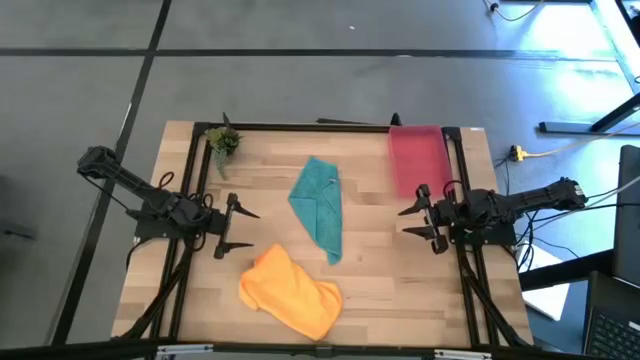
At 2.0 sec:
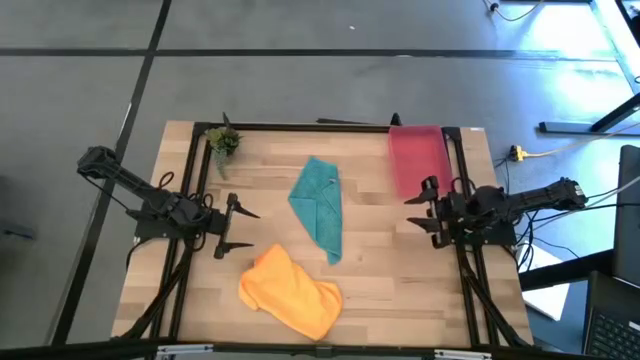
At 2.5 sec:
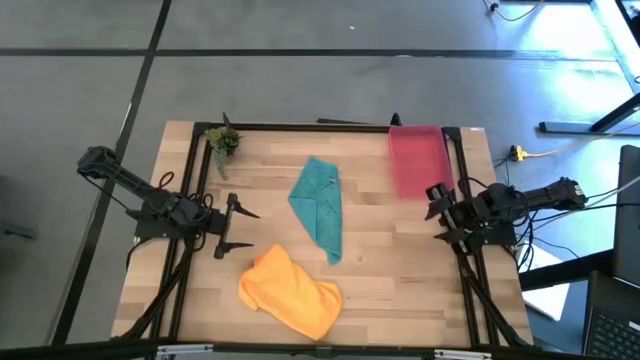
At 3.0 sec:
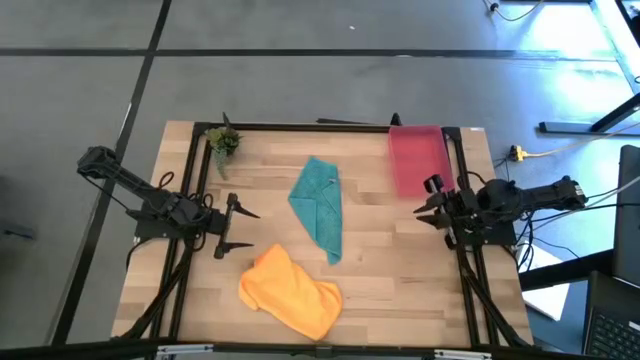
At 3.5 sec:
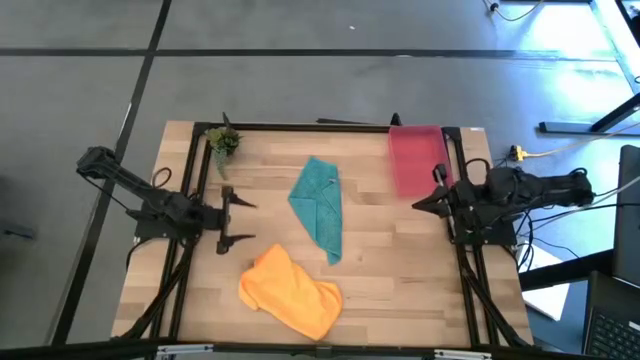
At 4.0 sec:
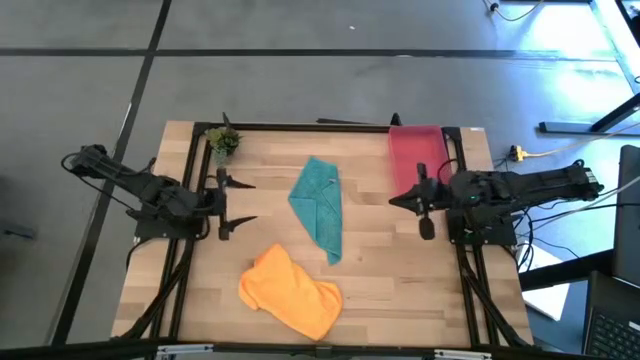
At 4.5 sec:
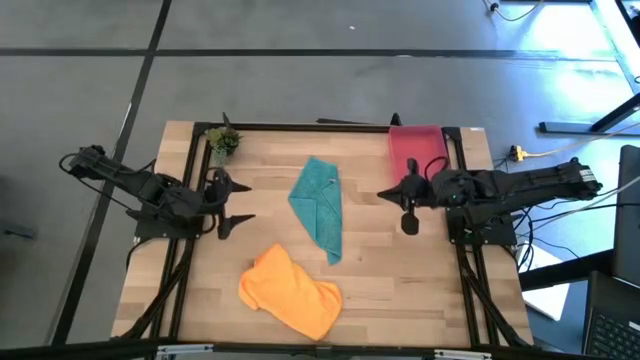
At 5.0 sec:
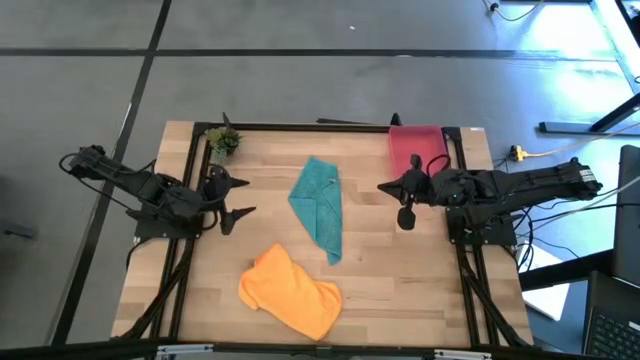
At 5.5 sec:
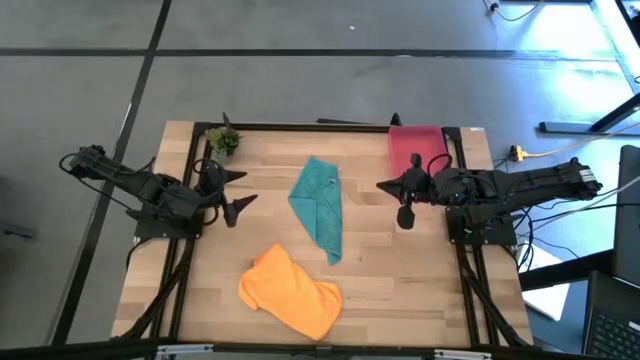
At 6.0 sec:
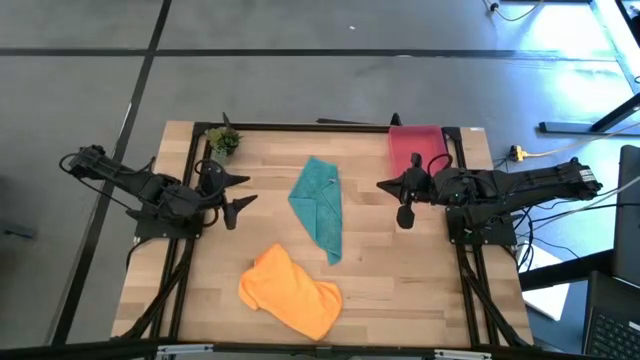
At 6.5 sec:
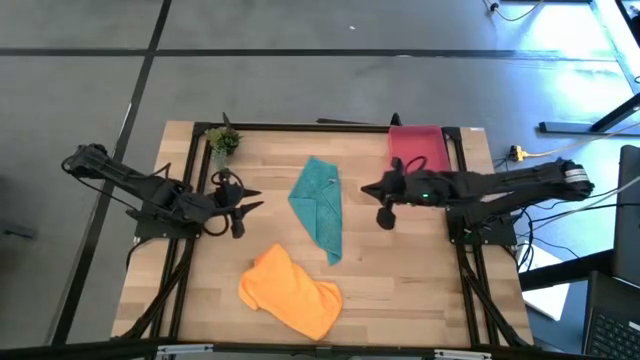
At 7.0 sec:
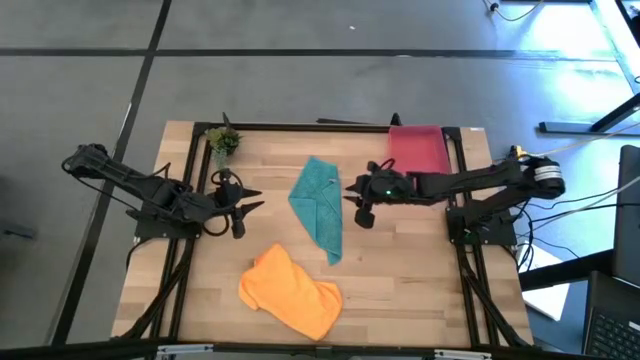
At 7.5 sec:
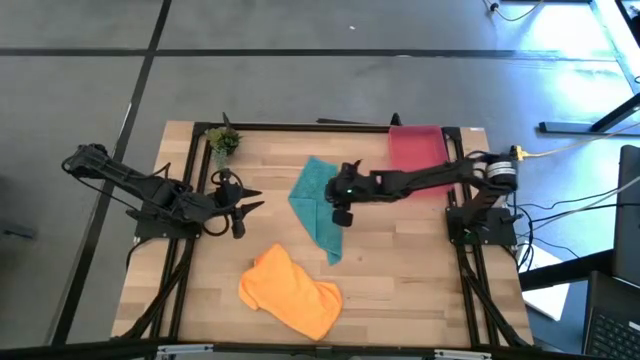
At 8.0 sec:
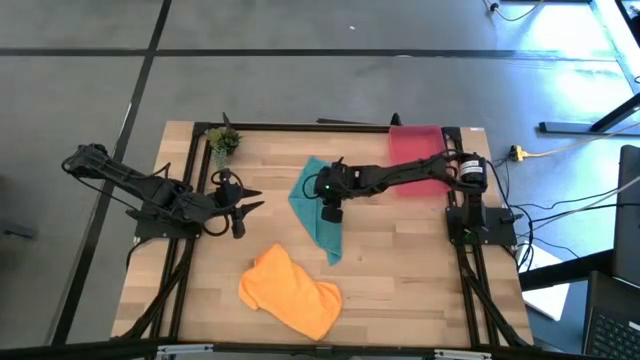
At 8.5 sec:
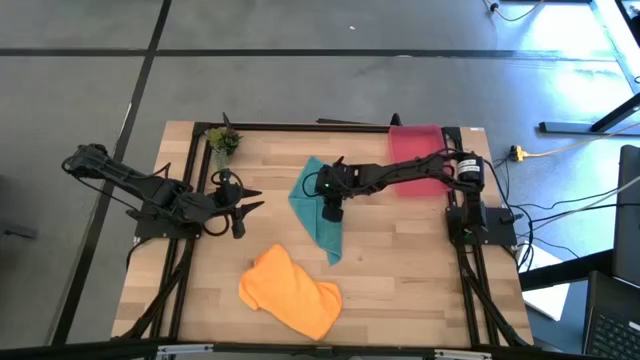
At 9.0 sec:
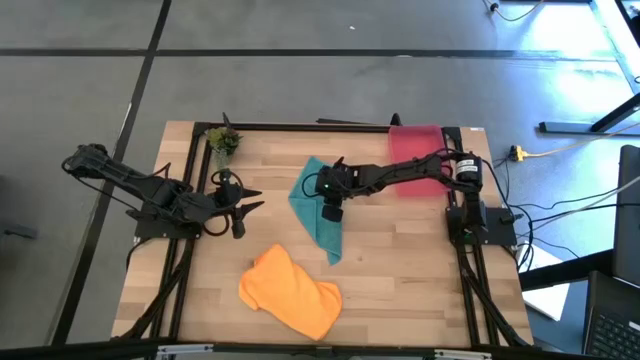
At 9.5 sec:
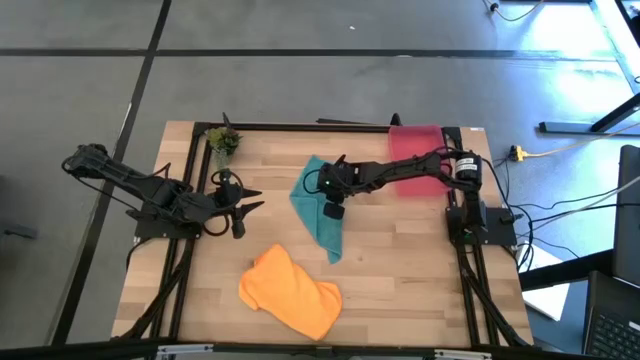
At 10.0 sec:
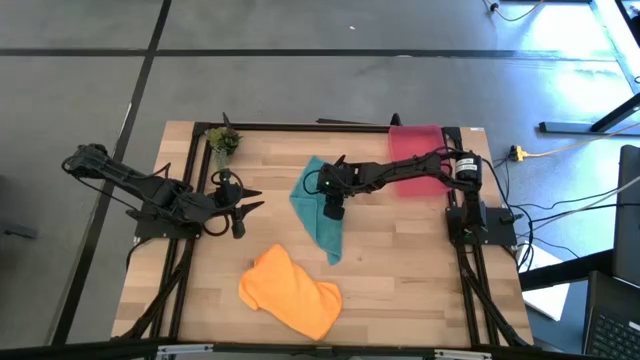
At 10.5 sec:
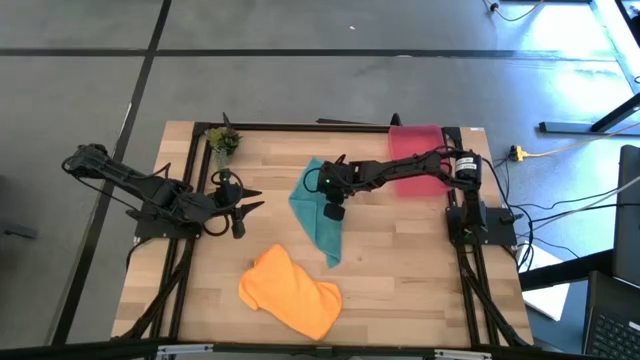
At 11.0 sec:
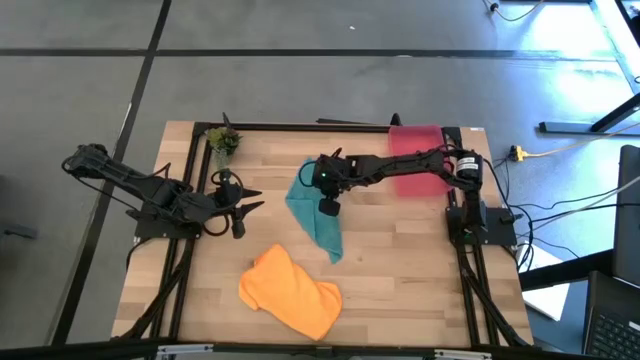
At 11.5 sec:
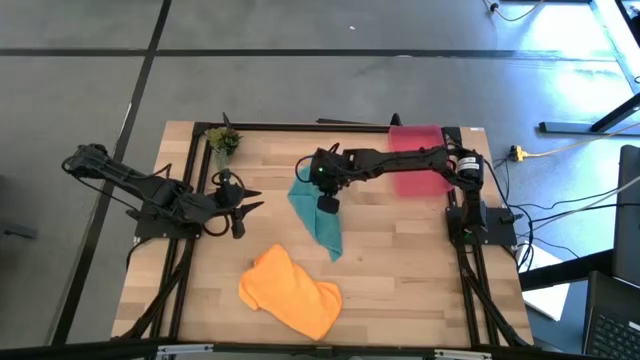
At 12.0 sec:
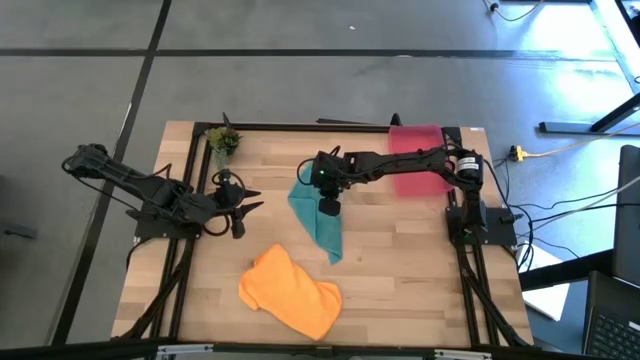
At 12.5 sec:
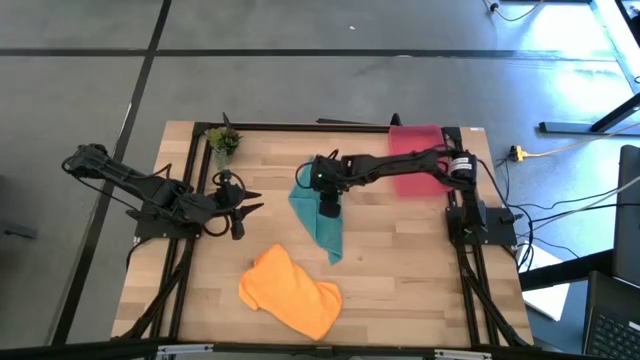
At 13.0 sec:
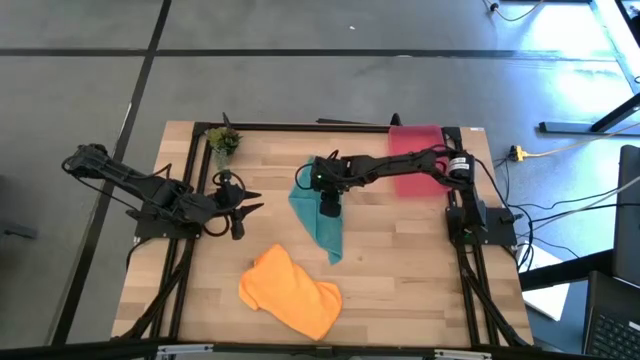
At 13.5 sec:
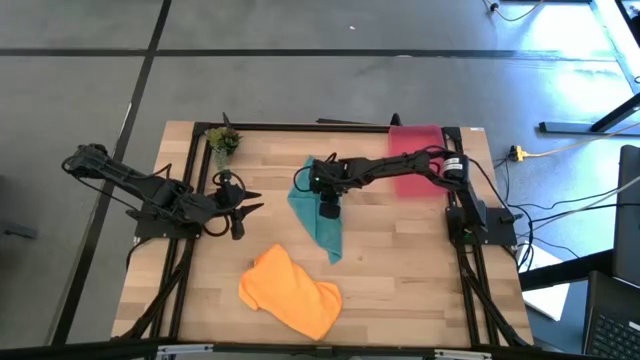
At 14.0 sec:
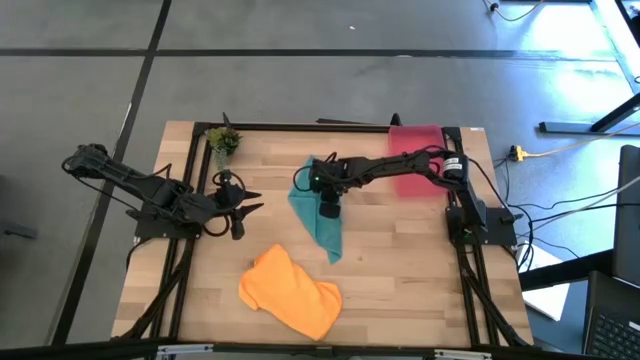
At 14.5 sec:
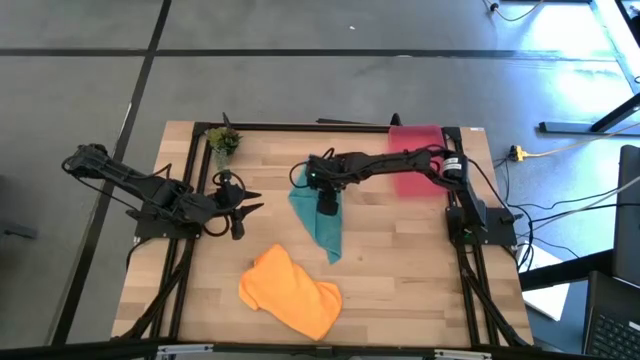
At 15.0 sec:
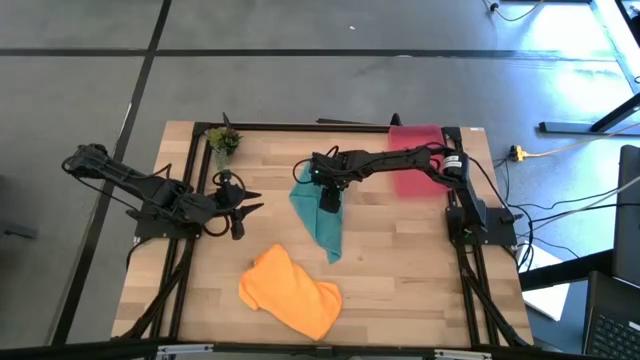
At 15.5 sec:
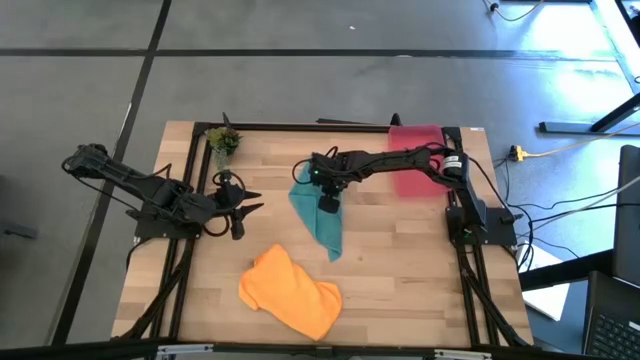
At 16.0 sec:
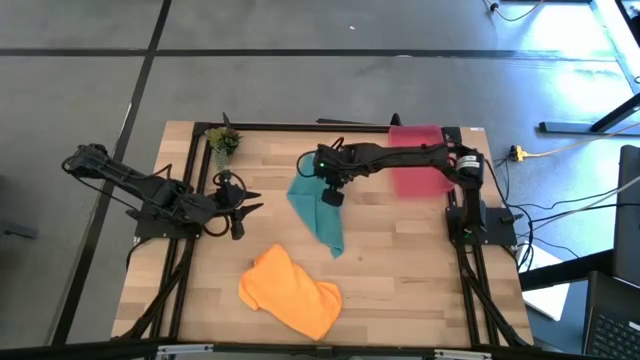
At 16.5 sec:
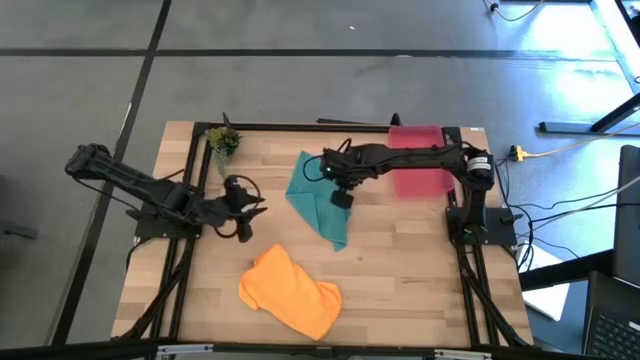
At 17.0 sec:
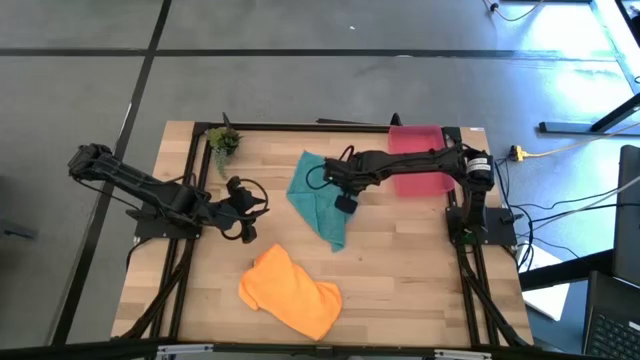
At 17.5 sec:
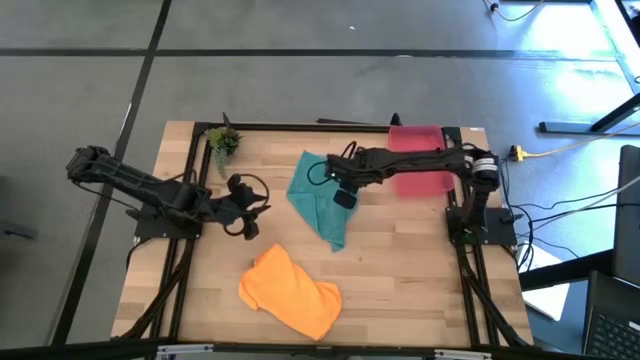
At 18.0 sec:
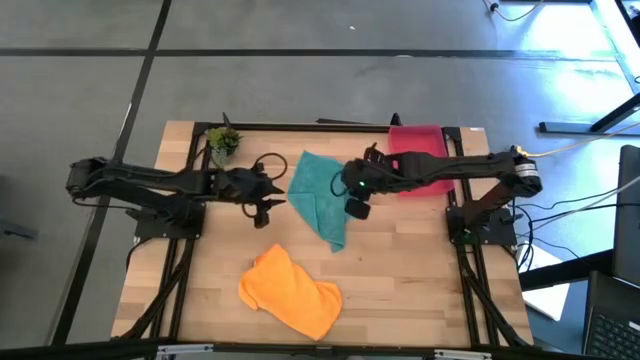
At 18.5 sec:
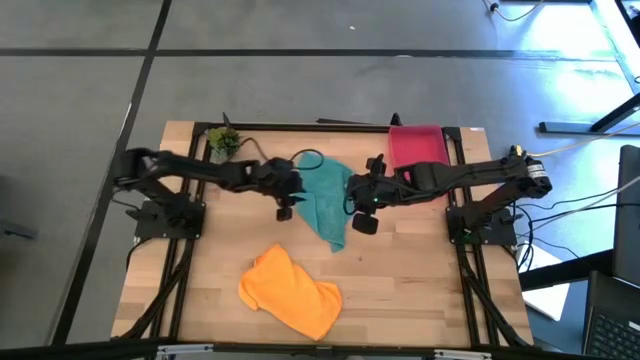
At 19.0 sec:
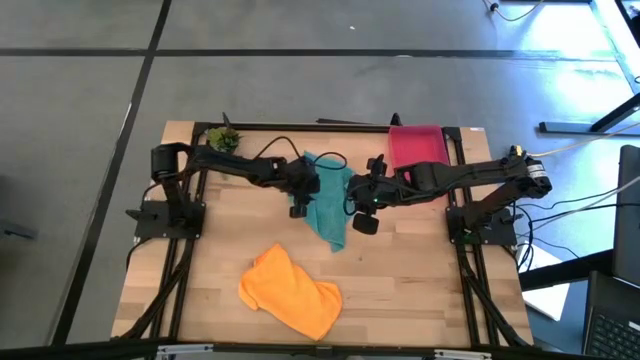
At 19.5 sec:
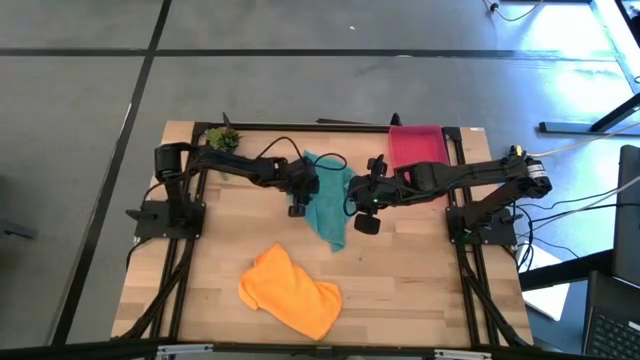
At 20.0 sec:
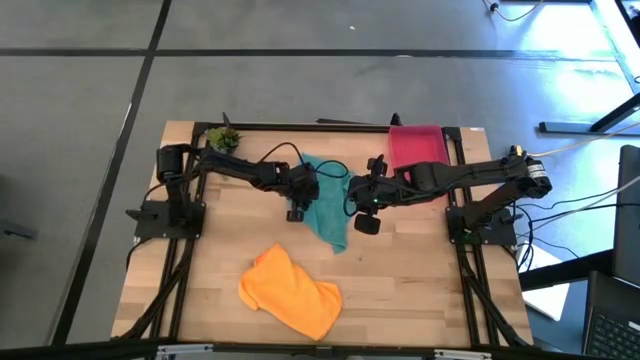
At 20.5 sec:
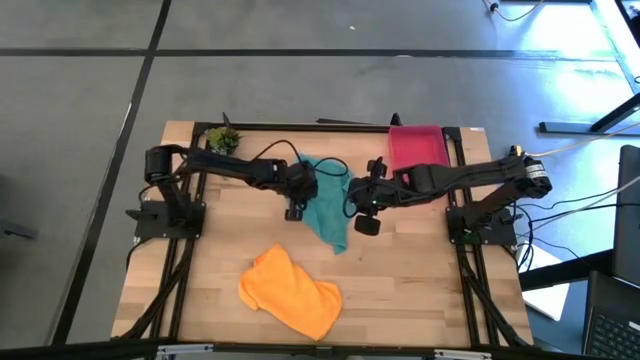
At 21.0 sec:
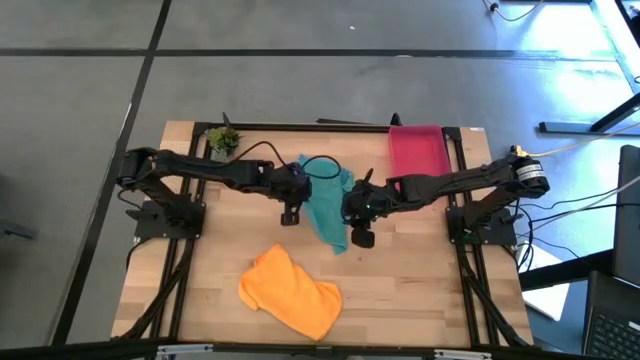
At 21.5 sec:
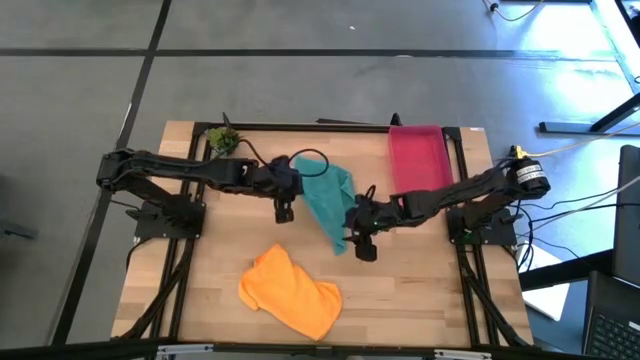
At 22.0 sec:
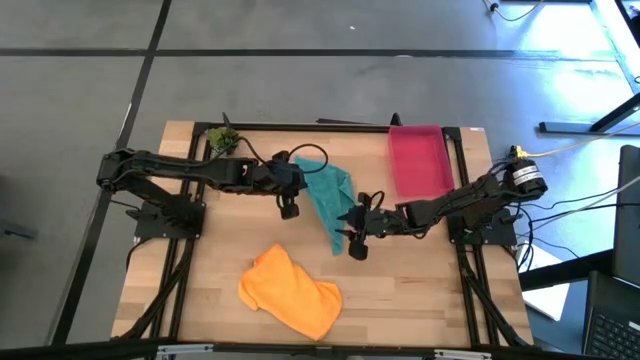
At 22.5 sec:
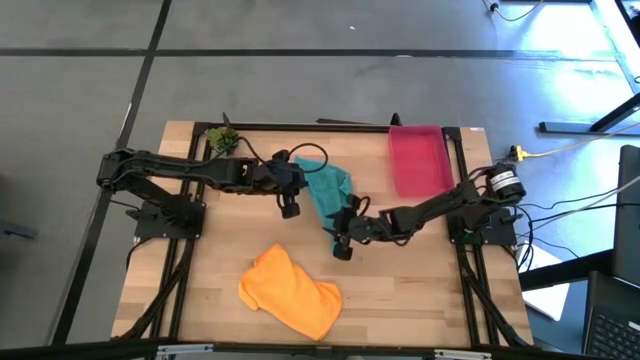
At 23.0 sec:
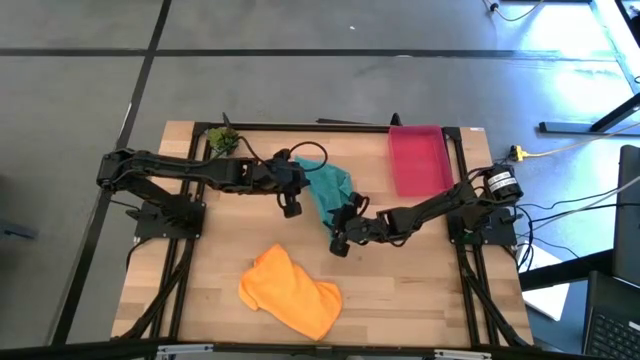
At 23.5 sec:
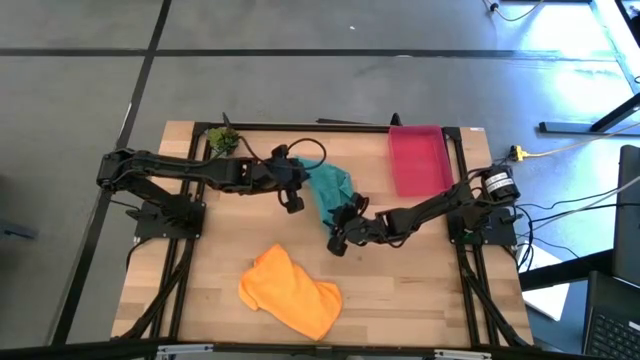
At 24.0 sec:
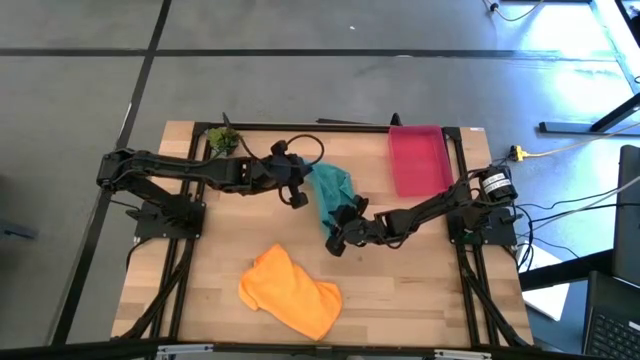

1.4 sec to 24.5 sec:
Task: Roll microfiber towels into tight, uniform cylinder then place into a basket
Roll the blue microfiber cloth on the table
